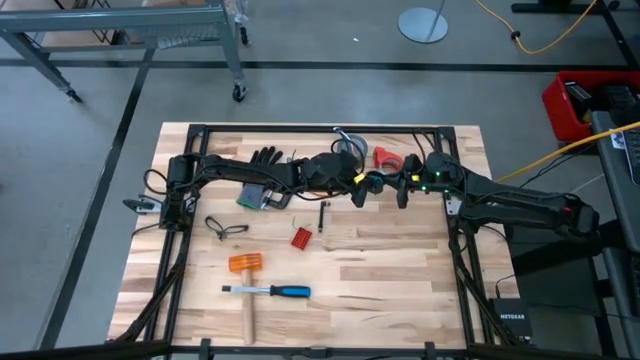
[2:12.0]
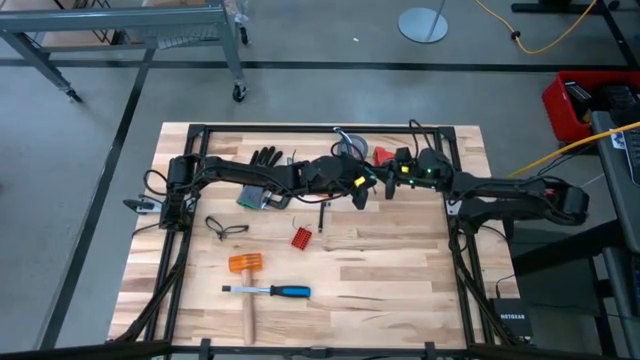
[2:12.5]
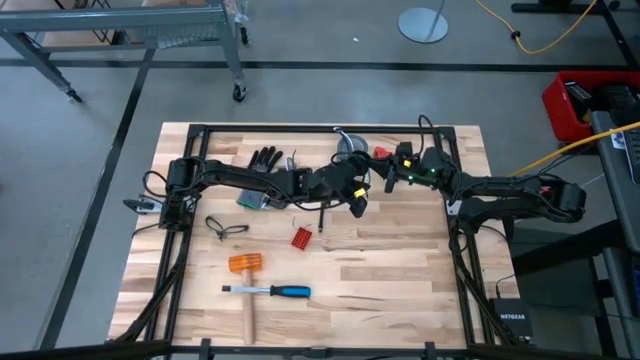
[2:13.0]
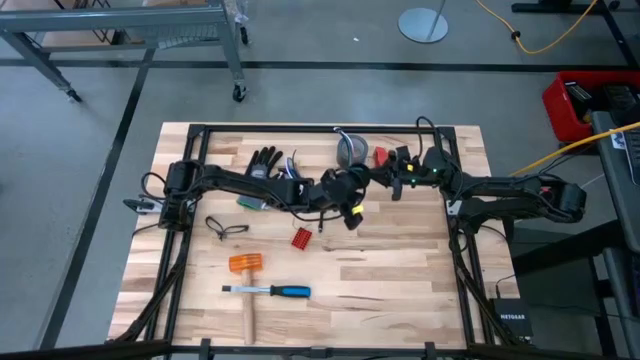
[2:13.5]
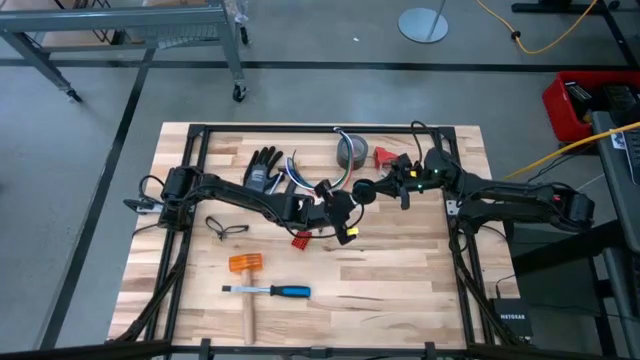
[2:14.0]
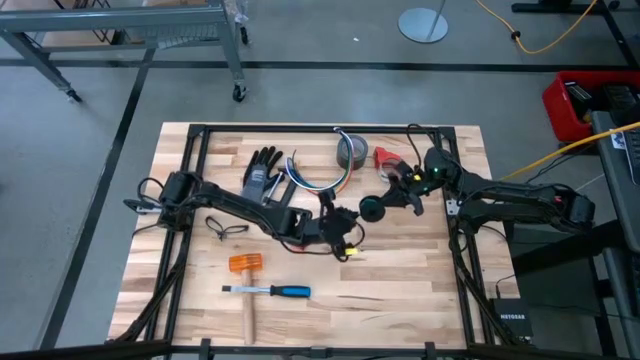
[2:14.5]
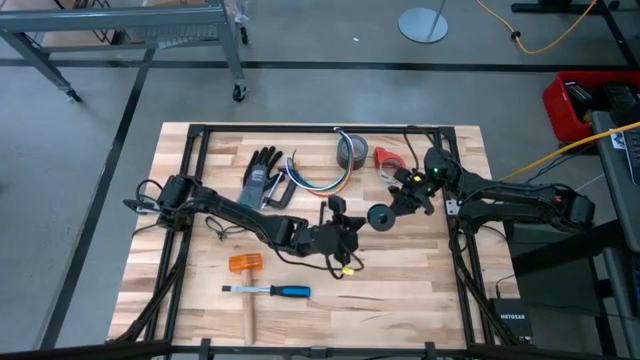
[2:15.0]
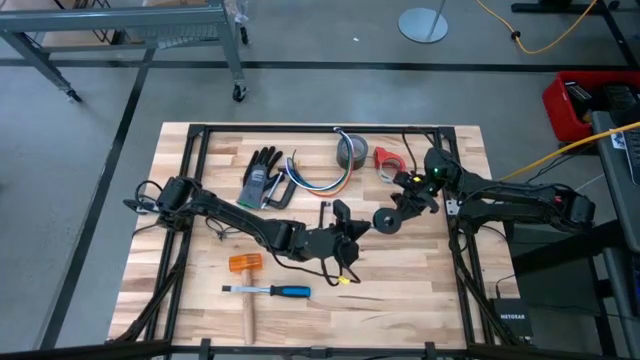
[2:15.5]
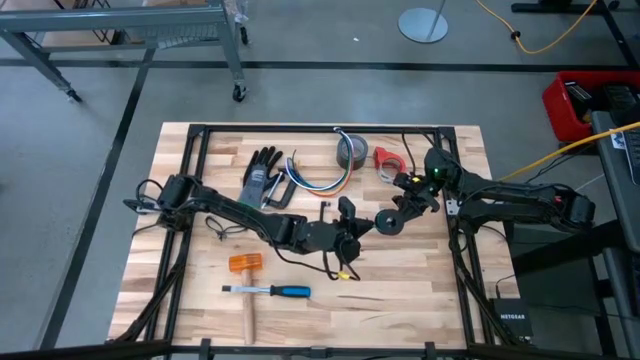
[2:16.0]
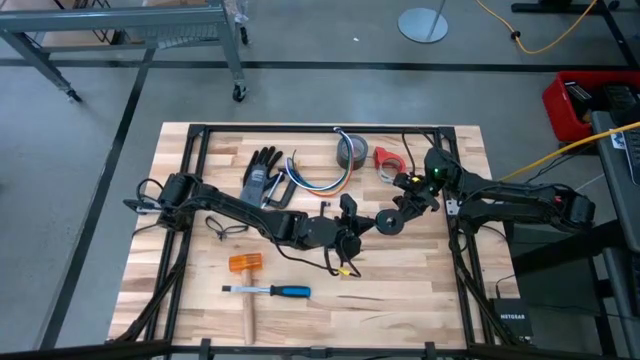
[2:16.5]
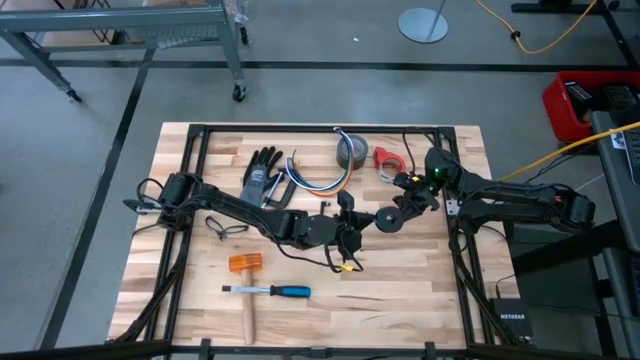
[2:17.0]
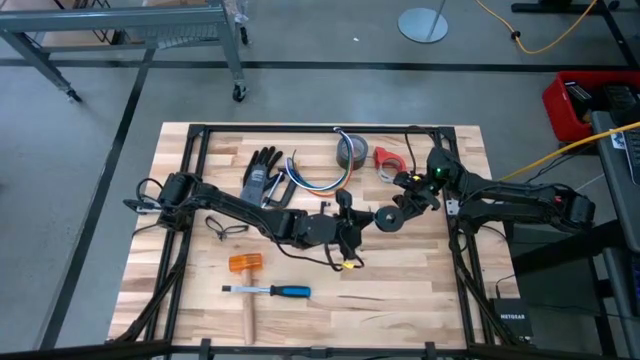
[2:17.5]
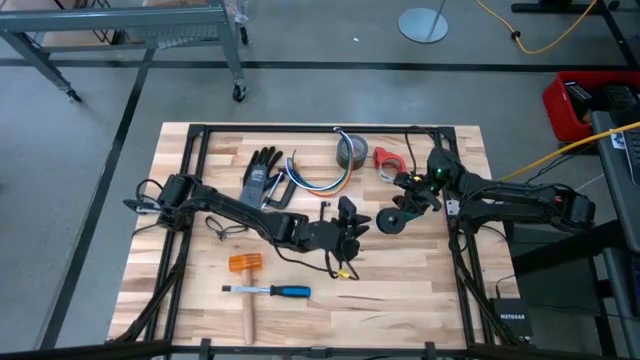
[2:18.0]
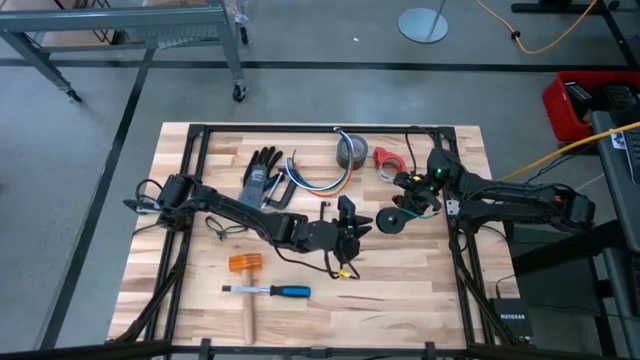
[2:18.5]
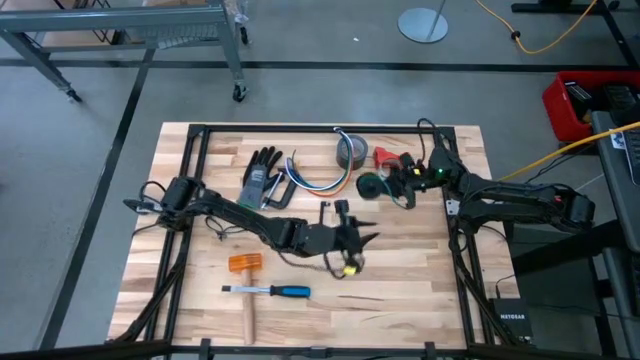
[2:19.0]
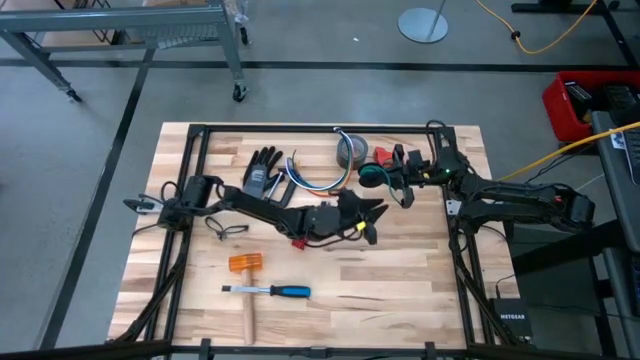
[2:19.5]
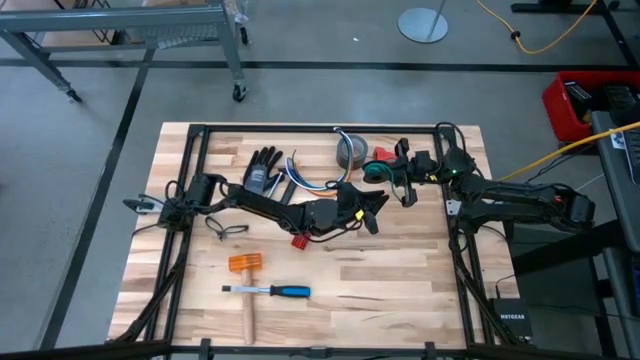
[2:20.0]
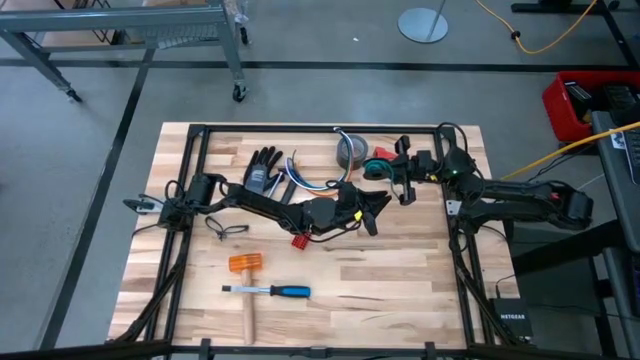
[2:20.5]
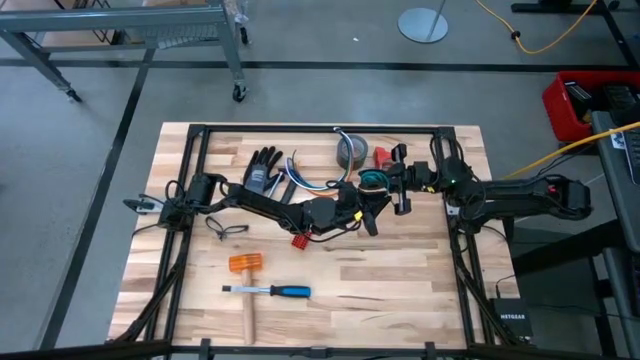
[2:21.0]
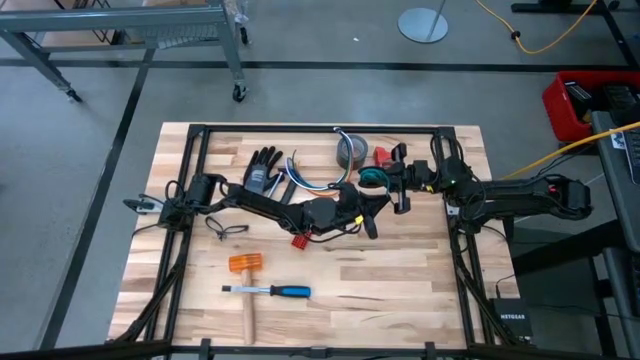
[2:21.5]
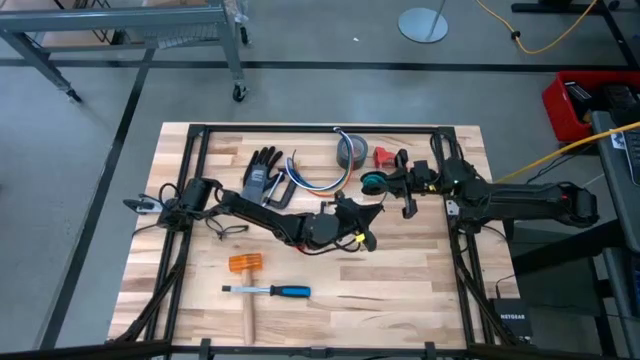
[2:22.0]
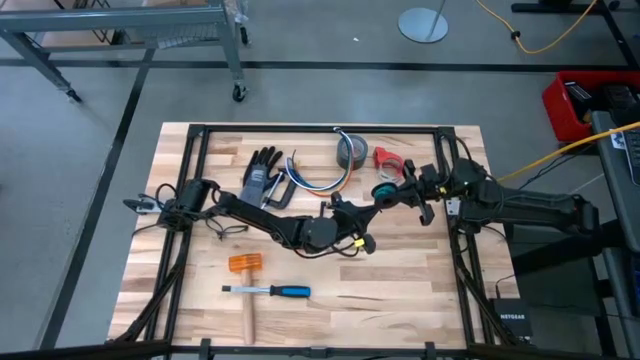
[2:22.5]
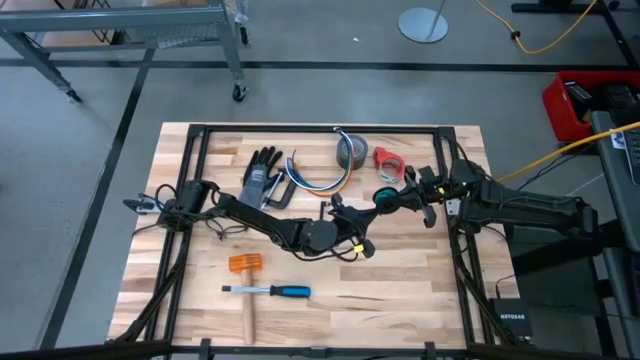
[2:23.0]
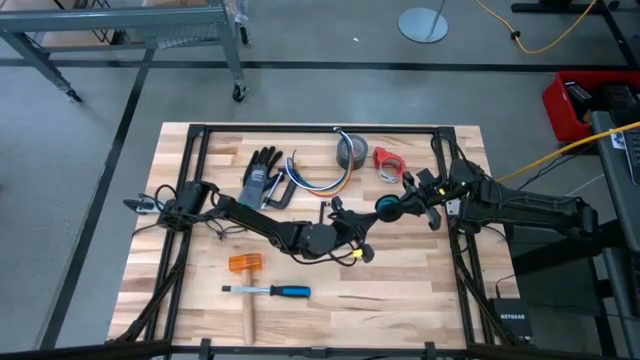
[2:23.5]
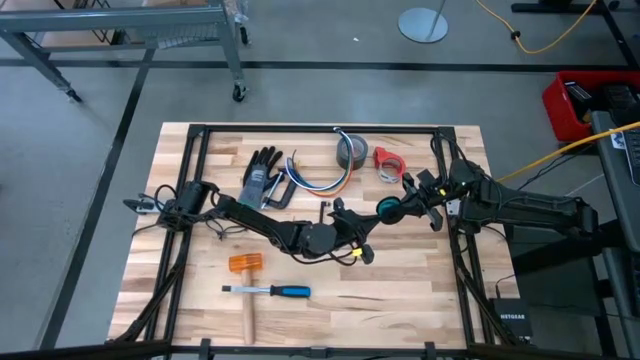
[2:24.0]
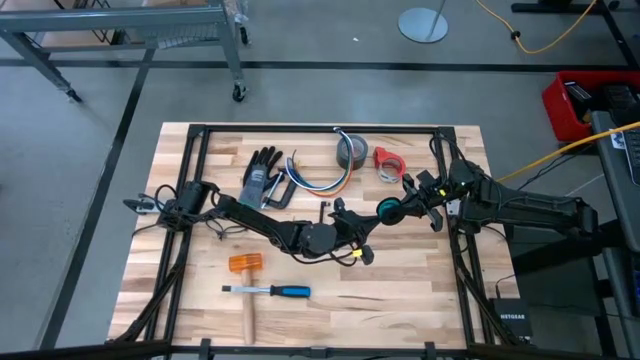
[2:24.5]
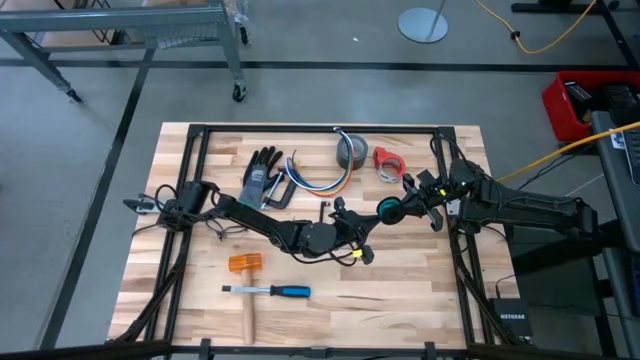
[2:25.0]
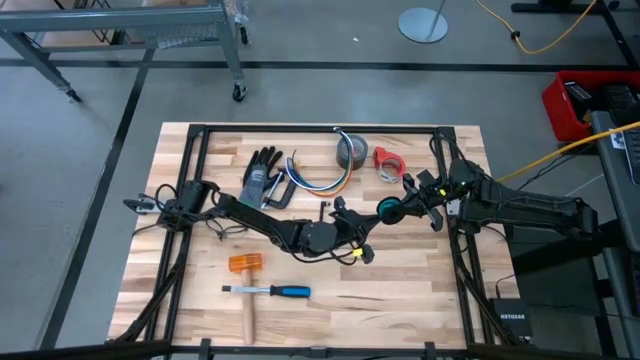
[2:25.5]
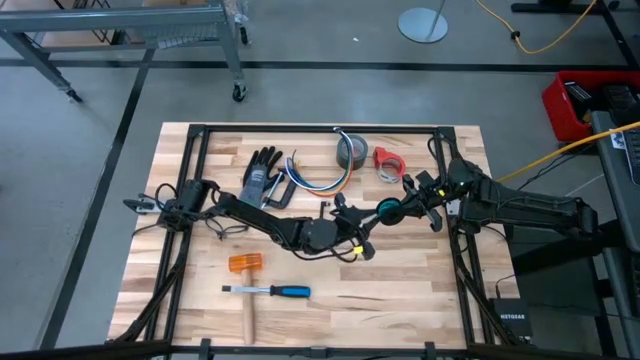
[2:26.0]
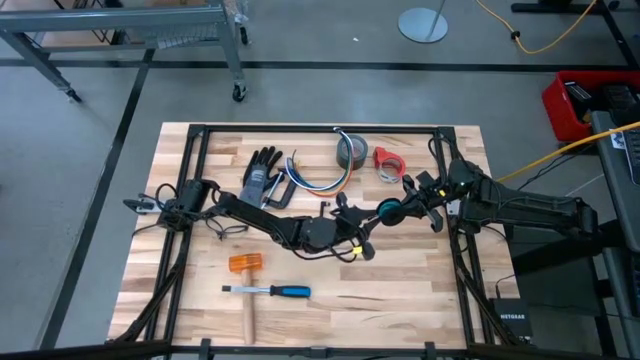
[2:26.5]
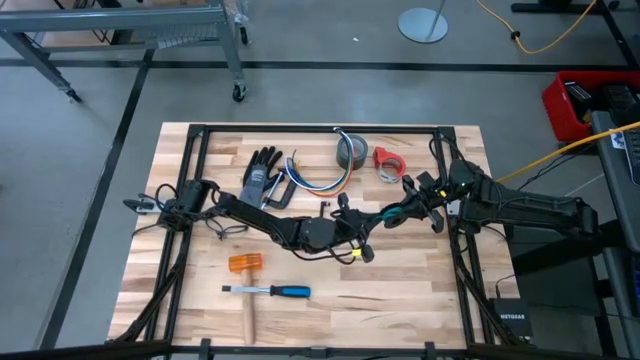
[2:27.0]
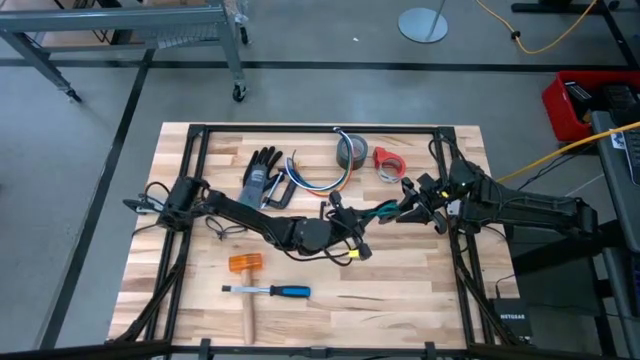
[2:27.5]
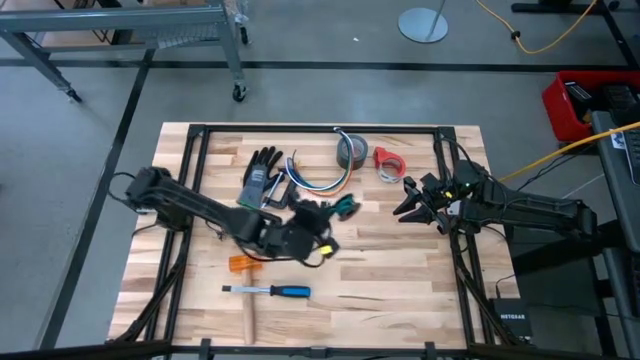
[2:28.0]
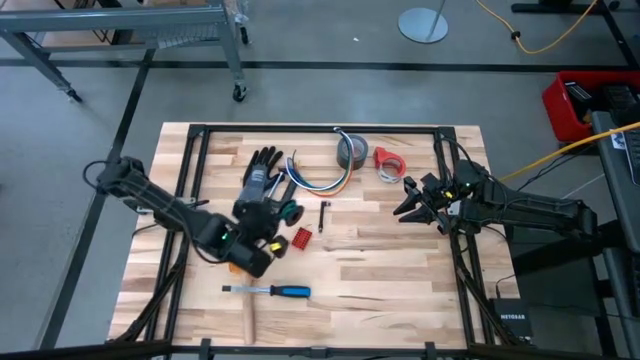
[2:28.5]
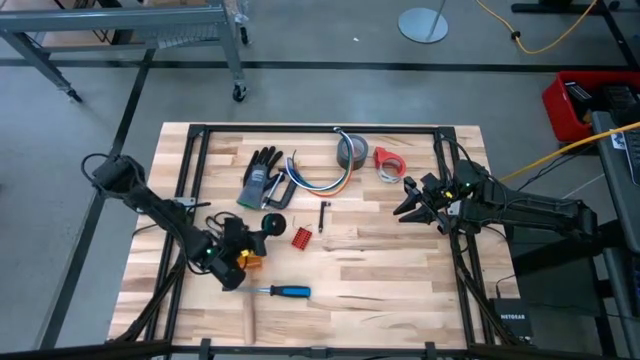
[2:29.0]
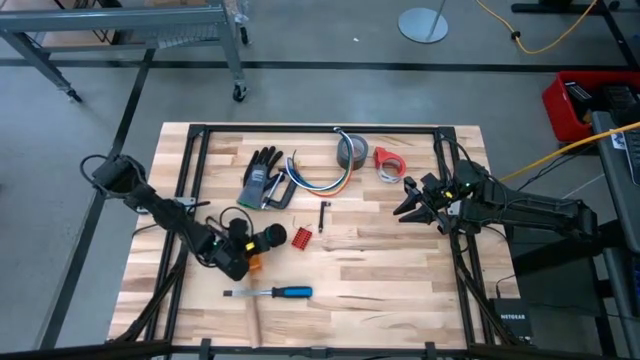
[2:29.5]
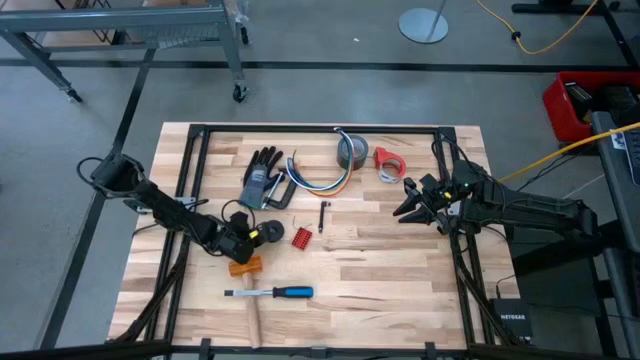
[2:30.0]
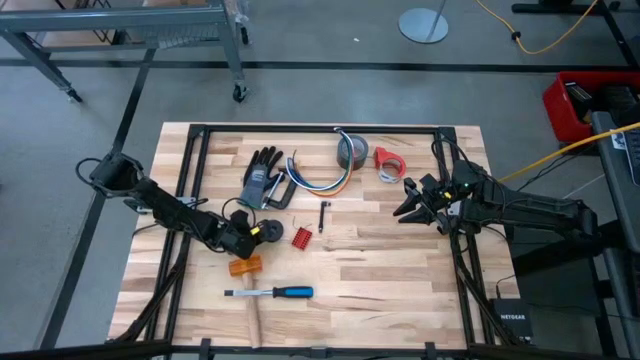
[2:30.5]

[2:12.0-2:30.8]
Task: Coil cords
Coil the green wire into the black spool

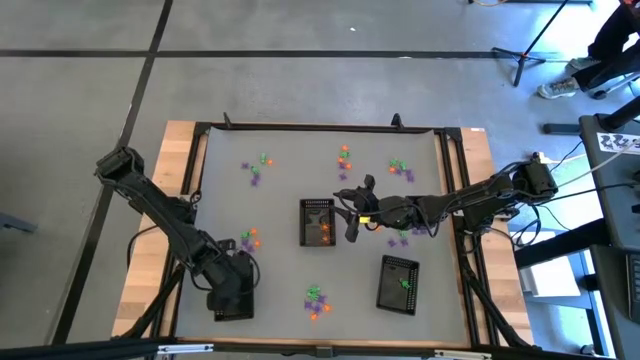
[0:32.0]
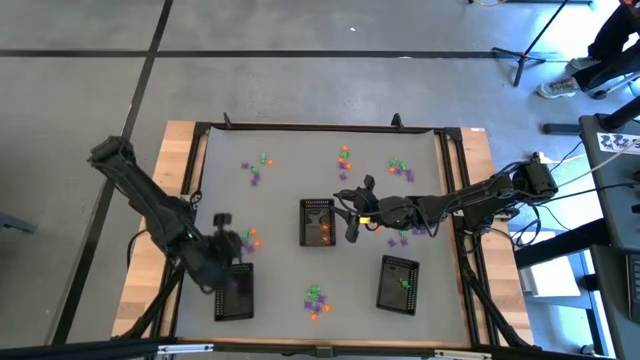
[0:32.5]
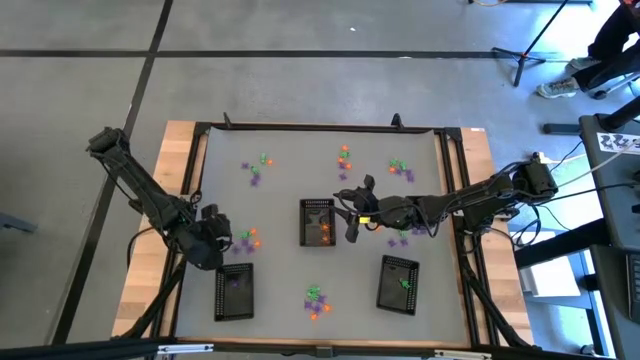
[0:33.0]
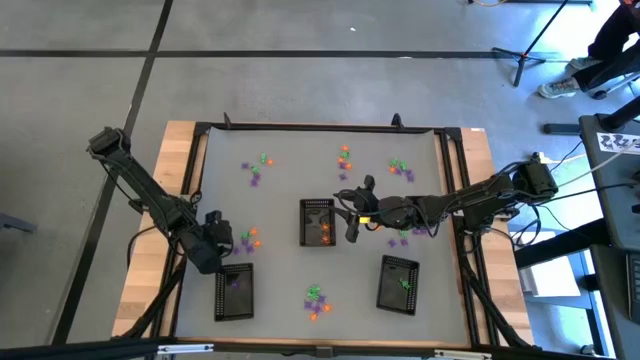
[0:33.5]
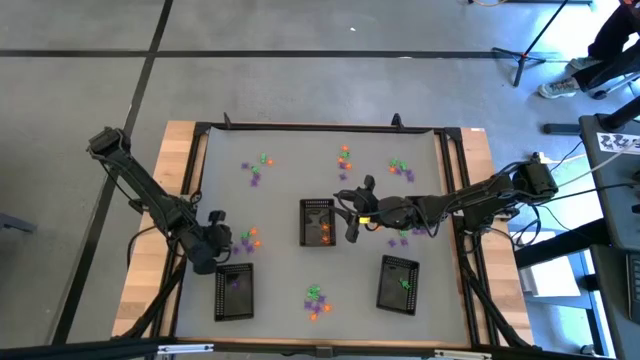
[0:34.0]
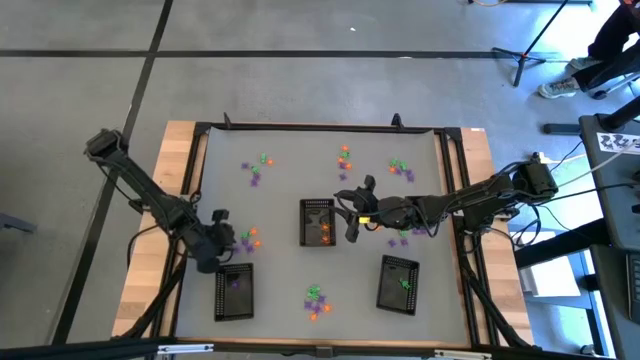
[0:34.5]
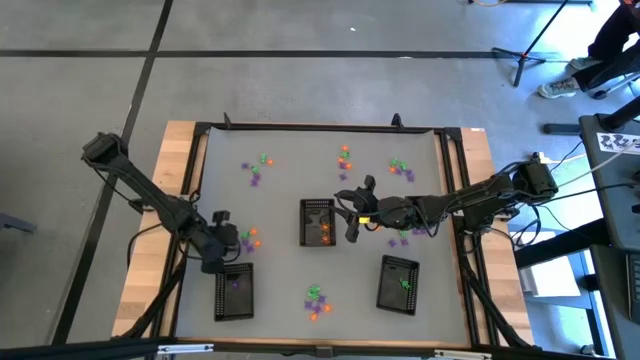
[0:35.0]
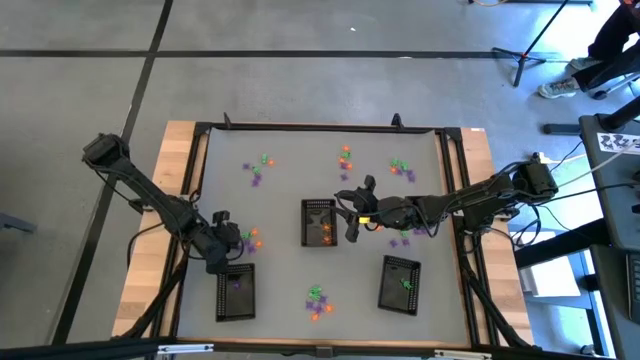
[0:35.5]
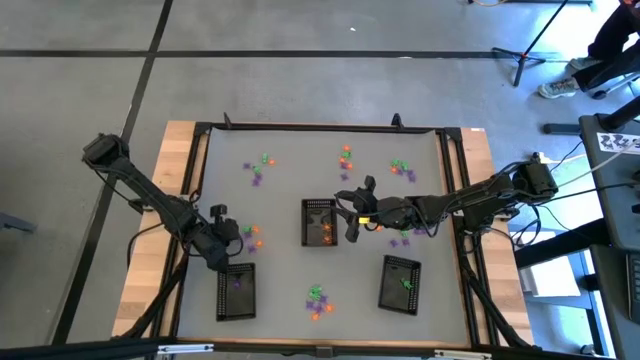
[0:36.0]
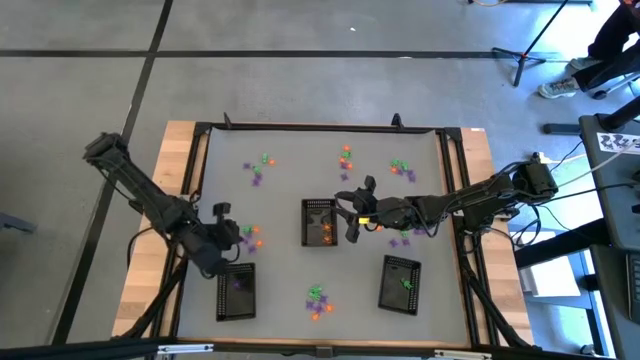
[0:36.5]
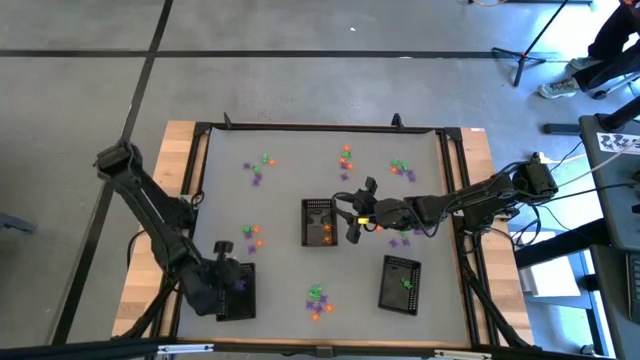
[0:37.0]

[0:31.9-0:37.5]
Task: Sort Halloween decoration
Put the violet spider toy into the bottom left black bin
